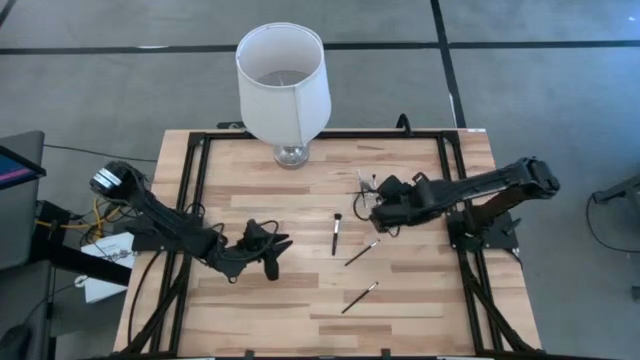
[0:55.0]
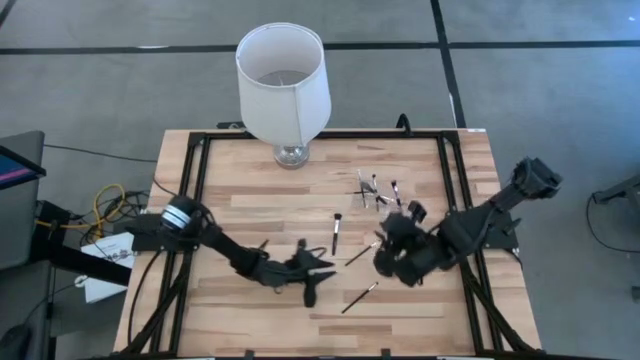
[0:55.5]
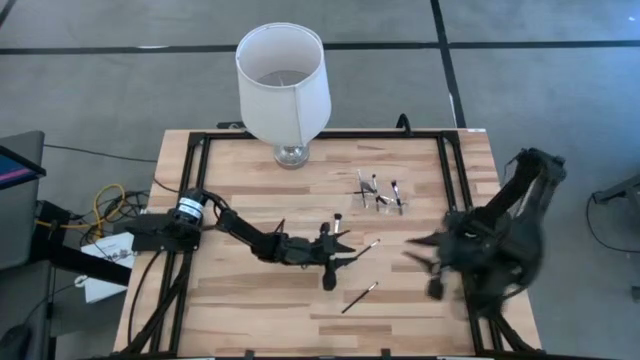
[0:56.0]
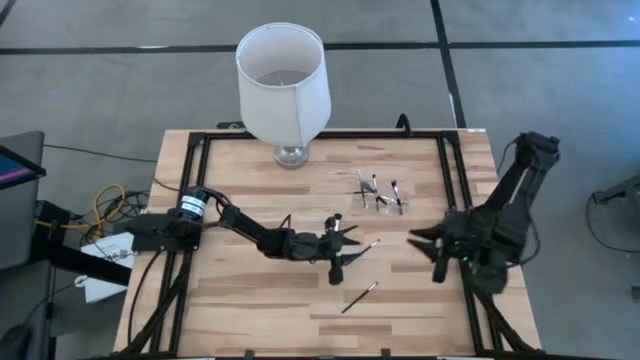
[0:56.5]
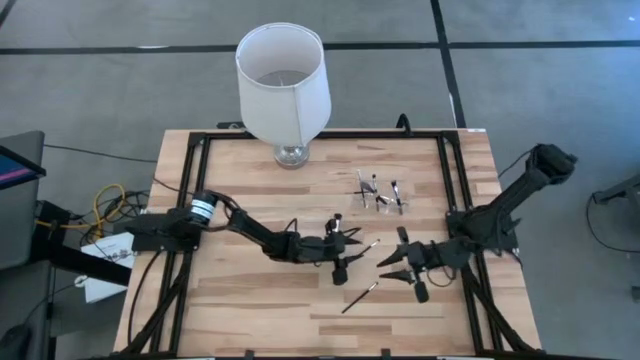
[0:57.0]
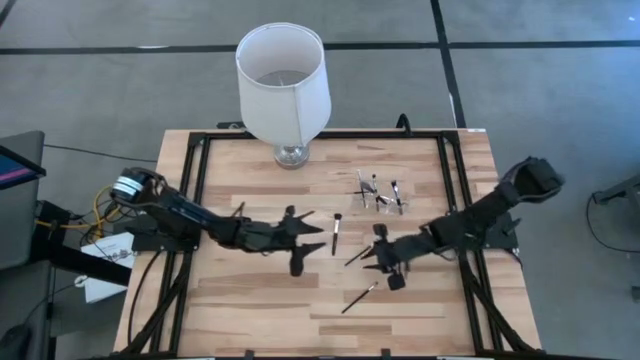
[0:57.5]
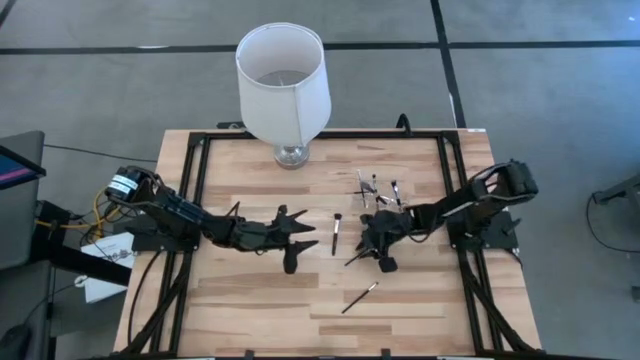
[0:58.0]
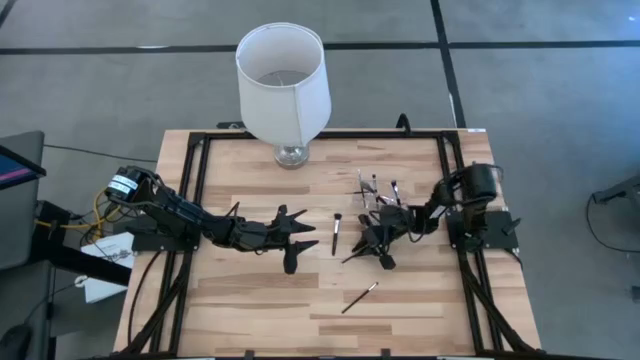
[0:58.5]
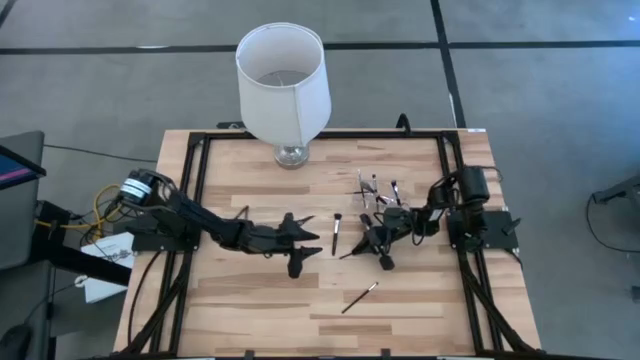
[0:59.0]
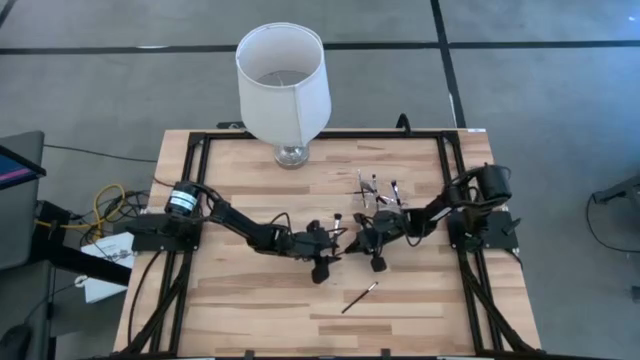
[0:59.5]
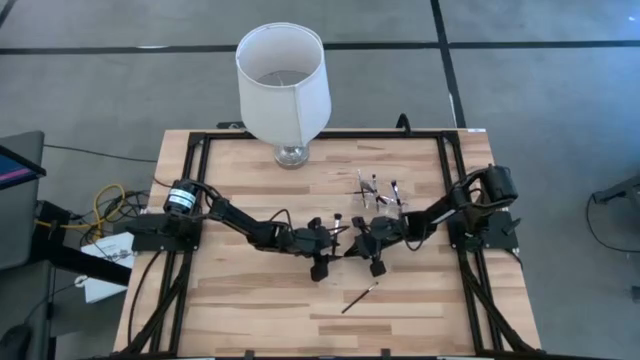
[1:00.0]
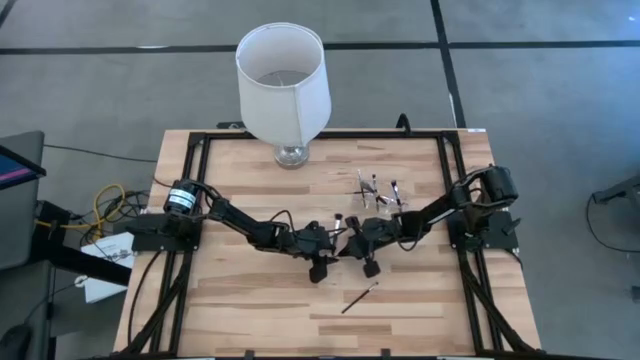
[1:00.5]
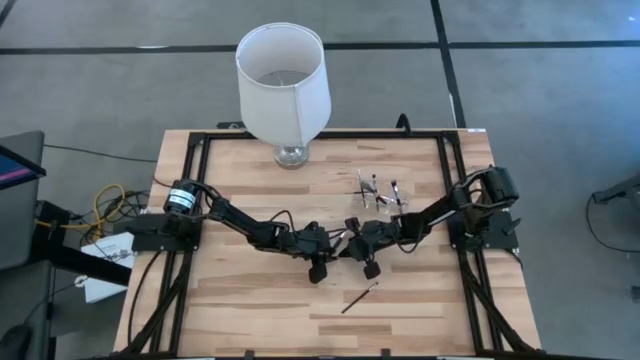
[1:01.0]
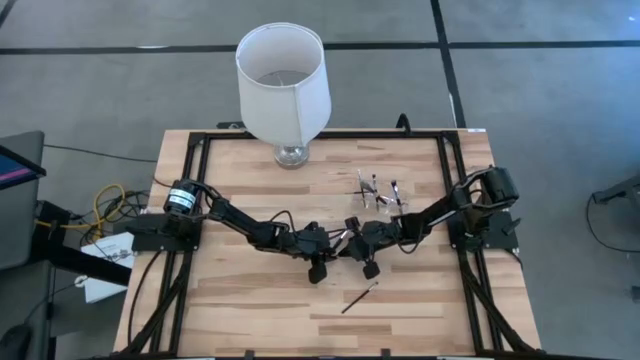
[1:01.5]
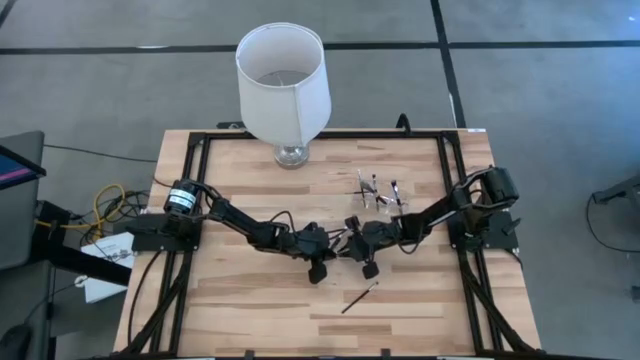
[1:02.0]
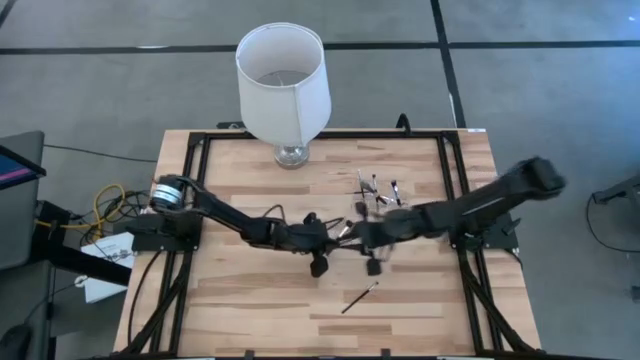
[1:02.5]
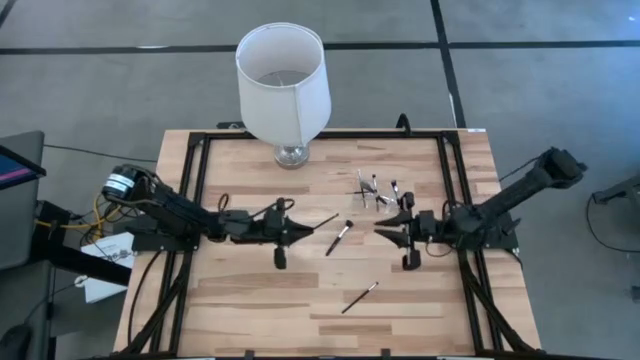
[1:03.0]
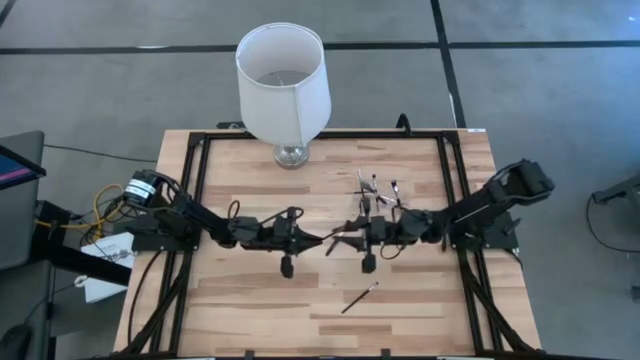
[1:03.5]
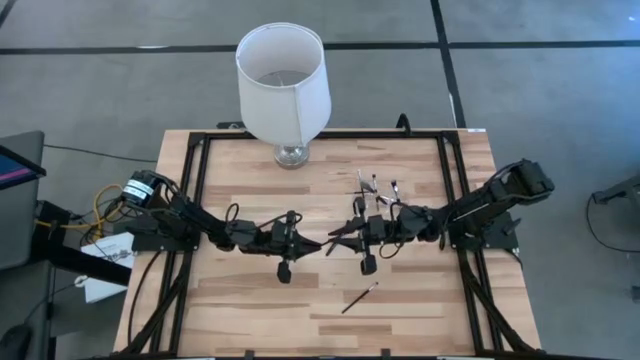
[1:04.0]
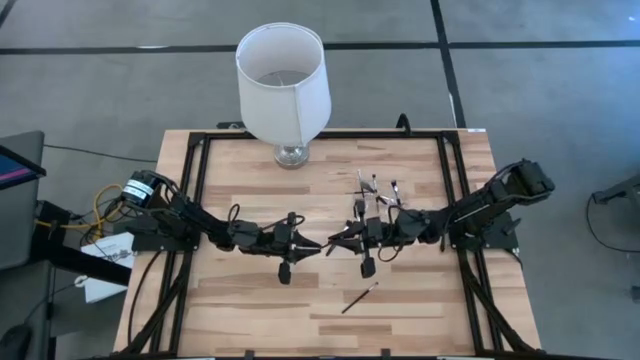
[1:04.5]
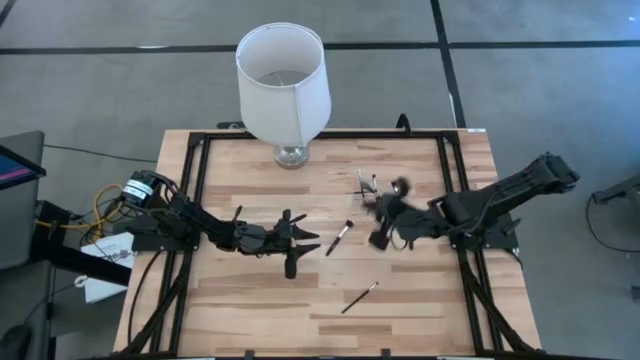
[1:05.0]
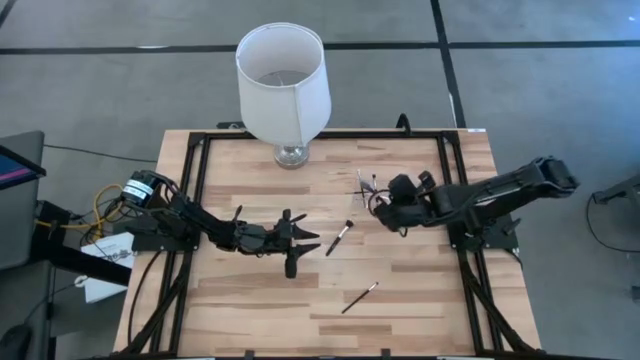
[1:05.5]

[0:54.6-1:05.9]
Task: Pick & Place Makeup Supplies
Put the black makeup brush into the transparent organizer

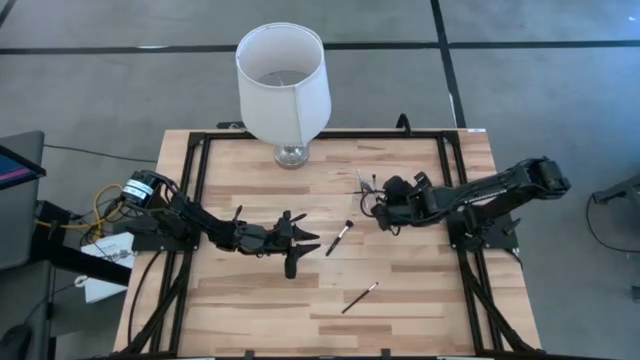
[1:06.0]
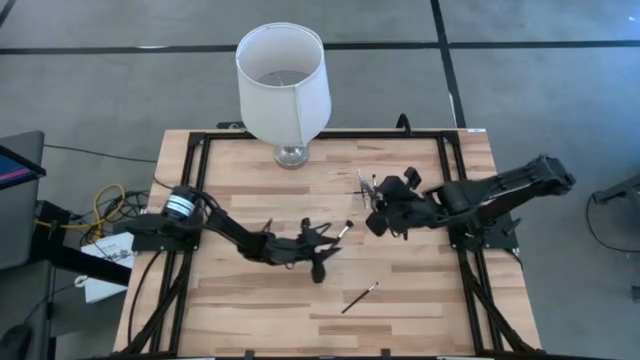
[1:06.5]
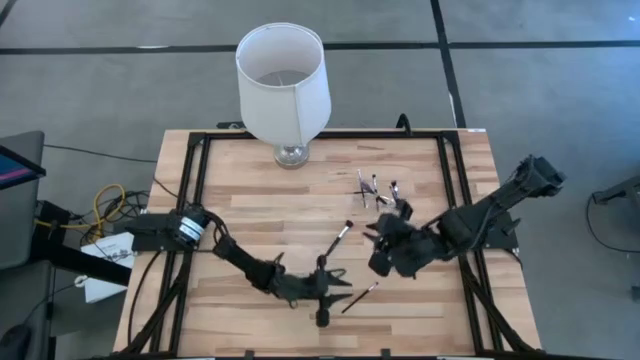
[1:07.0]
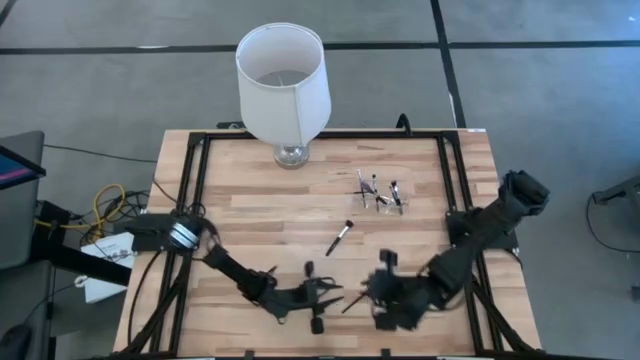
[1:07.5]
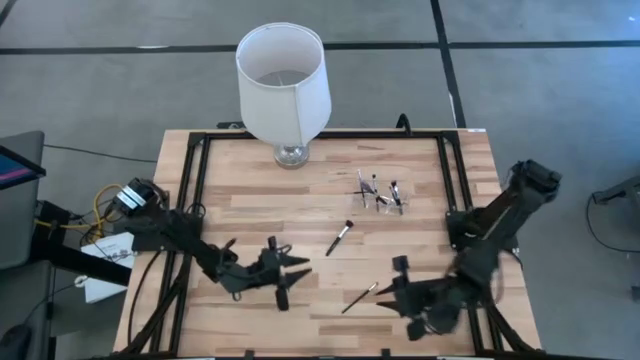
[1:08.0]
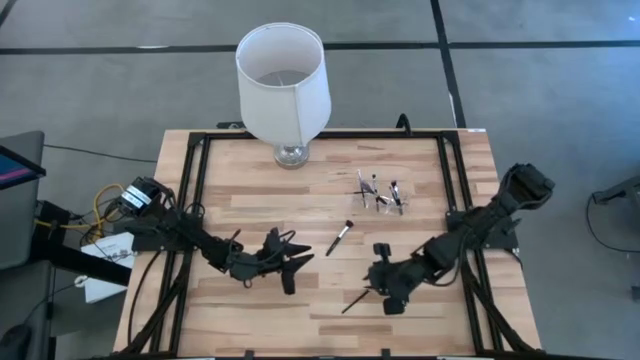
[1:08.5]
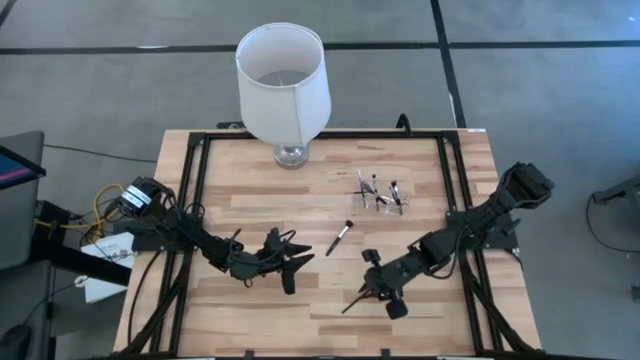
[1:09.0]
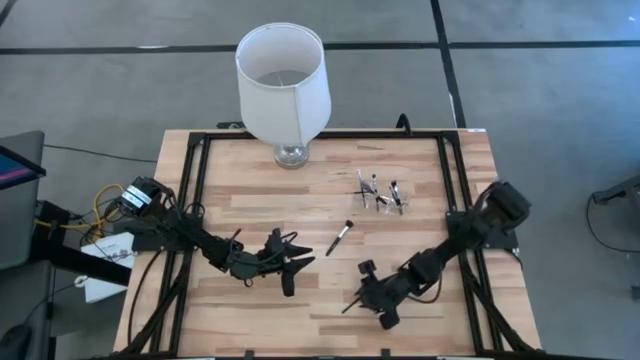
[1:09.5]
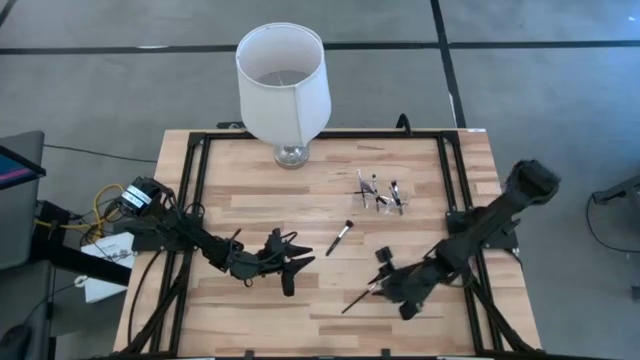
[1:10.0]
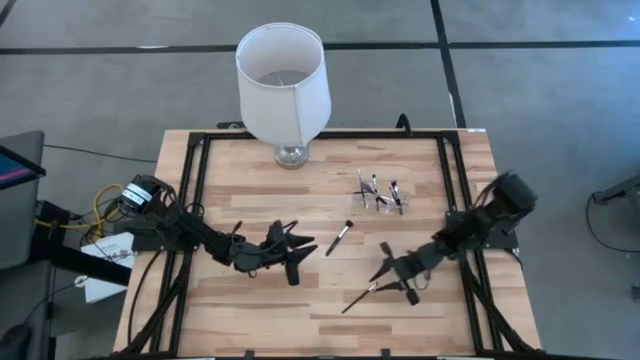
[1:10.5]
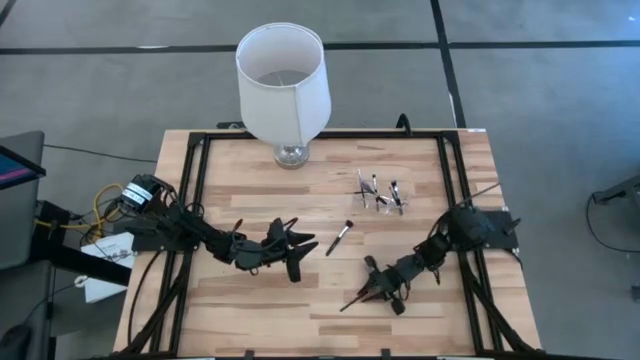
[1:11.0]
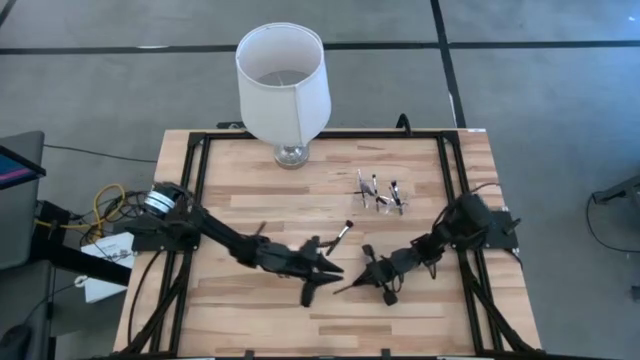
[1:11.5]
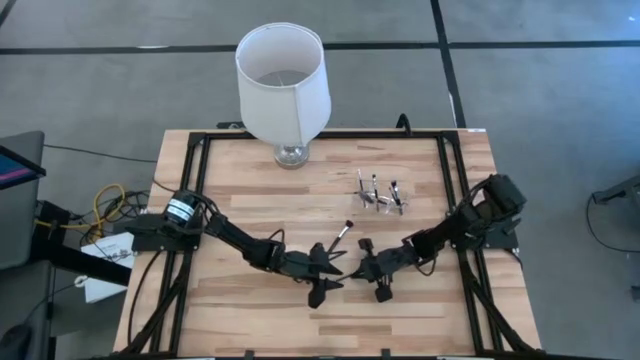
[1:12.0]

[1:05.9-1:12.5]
Put the black makeup brush into the transparent organizer

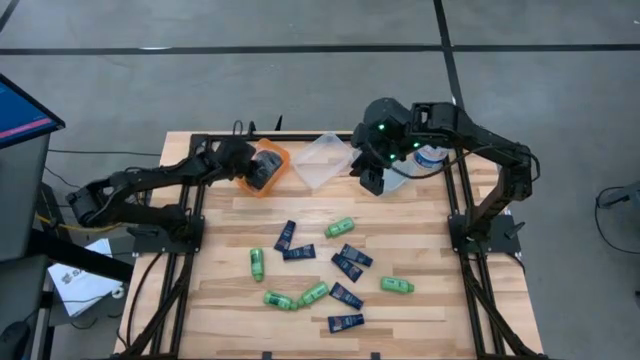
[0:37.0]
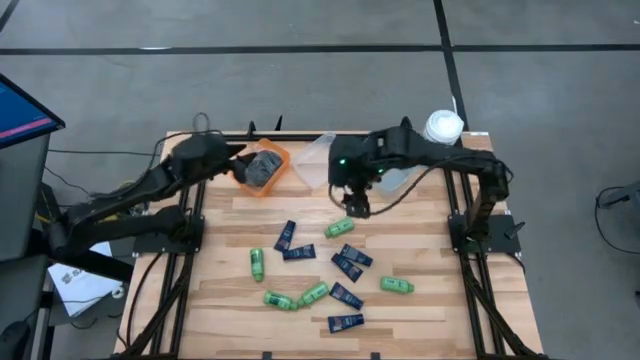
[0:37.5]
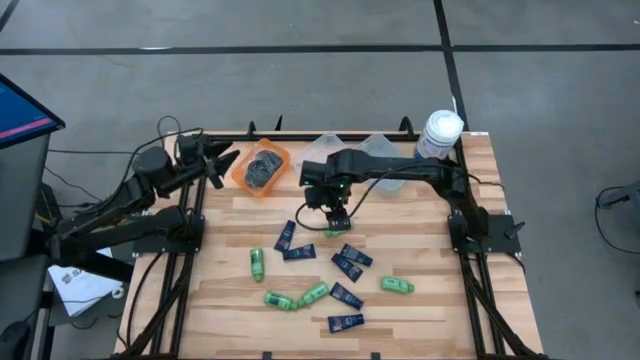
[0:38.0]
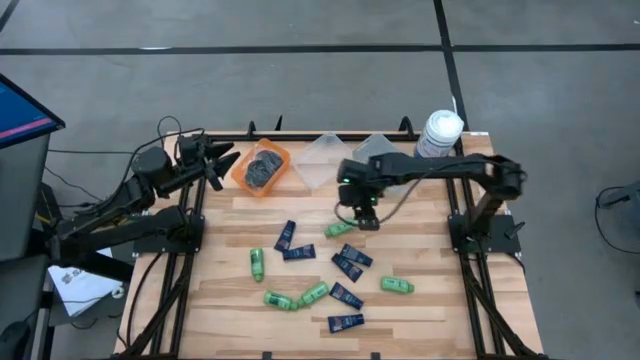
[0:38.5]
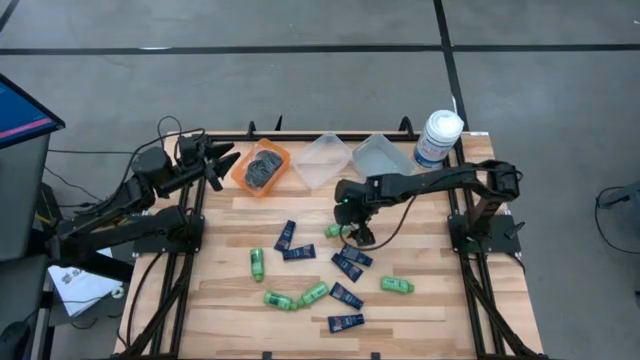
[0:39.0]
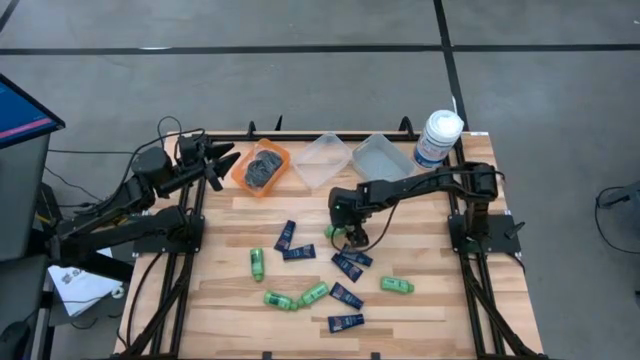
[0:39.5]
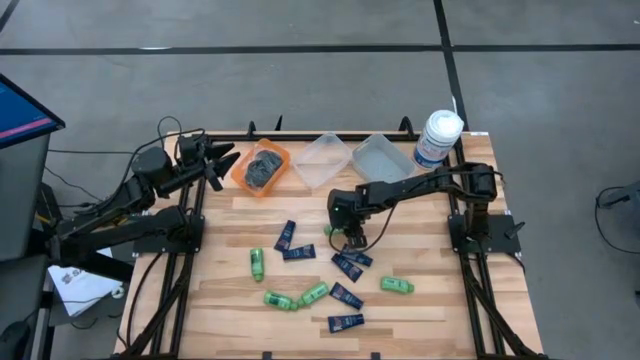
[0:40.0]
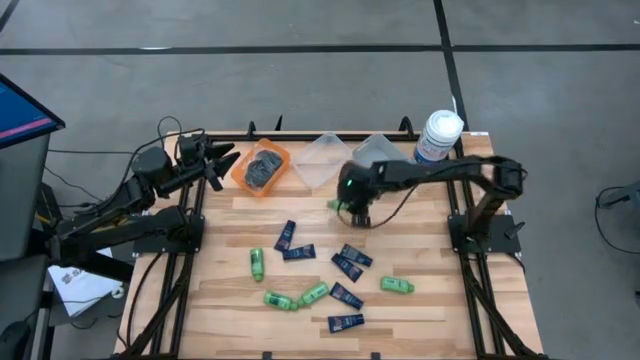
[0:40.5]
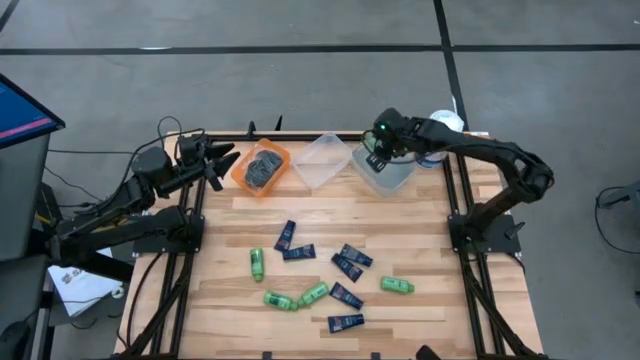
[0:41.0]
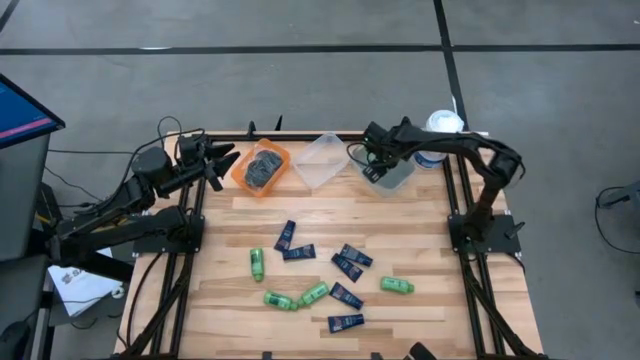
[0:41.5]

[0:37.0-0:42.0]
Task: Pick & Place Travel size toiletries
Put the green shampoo into the gray bin
